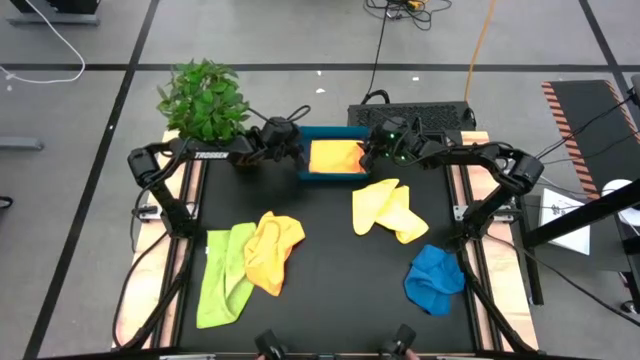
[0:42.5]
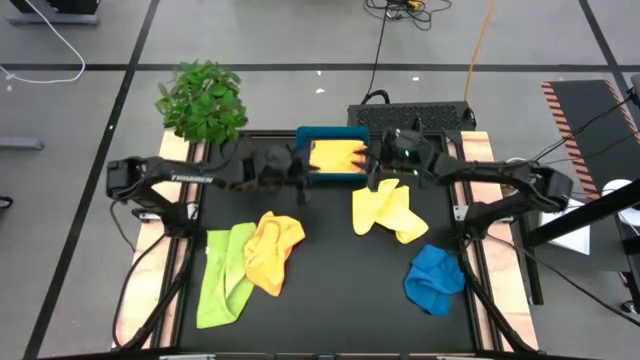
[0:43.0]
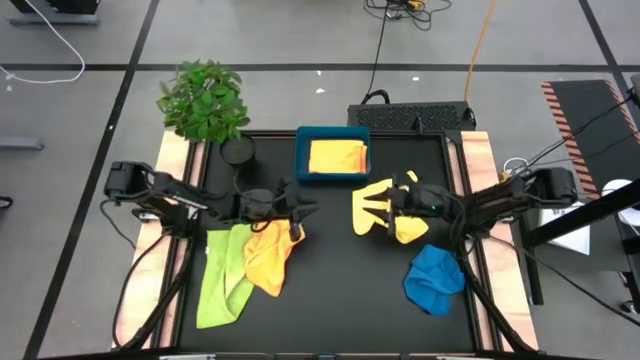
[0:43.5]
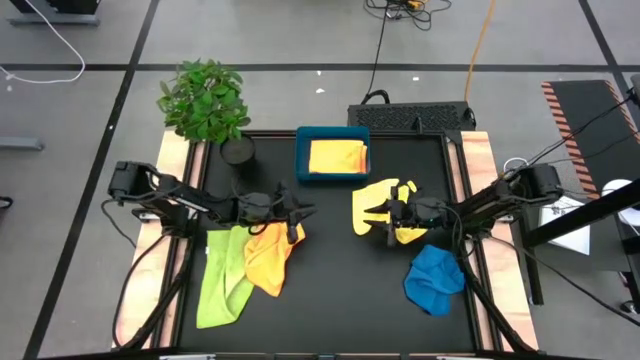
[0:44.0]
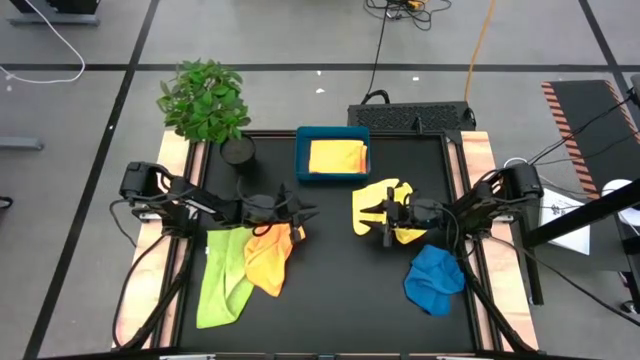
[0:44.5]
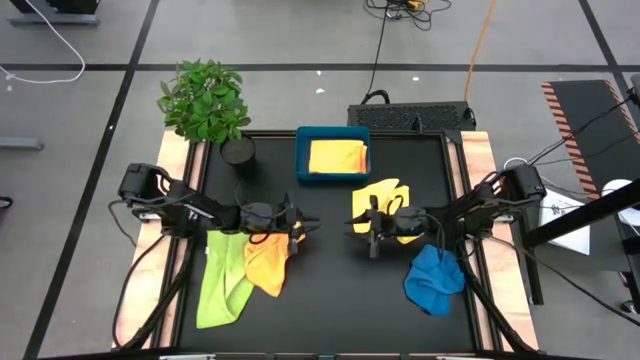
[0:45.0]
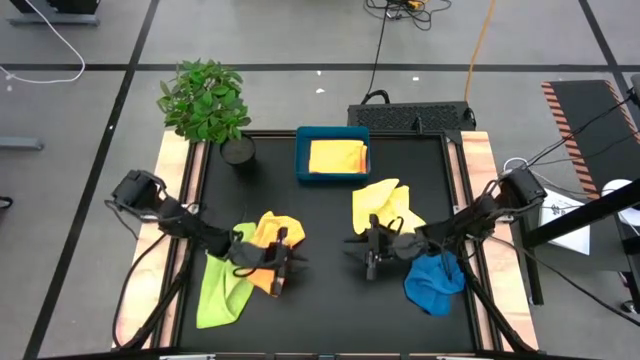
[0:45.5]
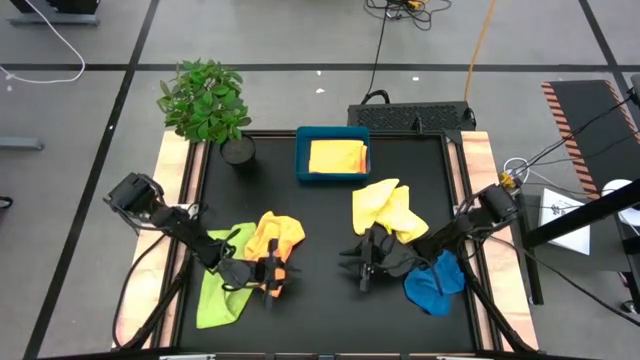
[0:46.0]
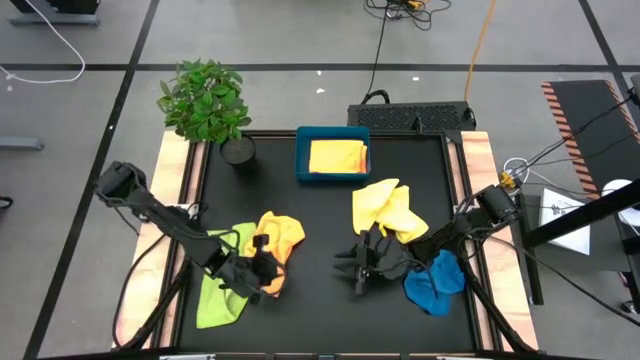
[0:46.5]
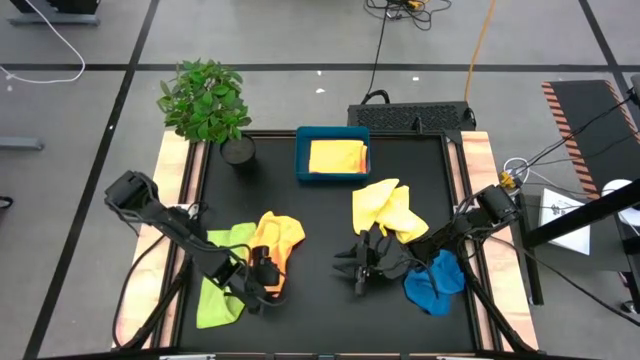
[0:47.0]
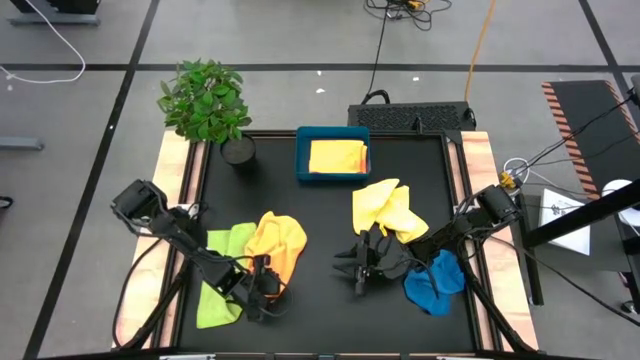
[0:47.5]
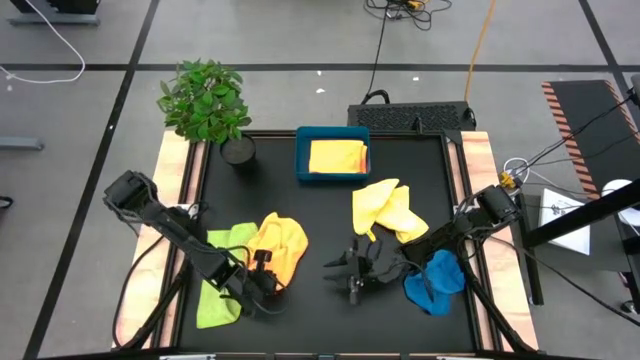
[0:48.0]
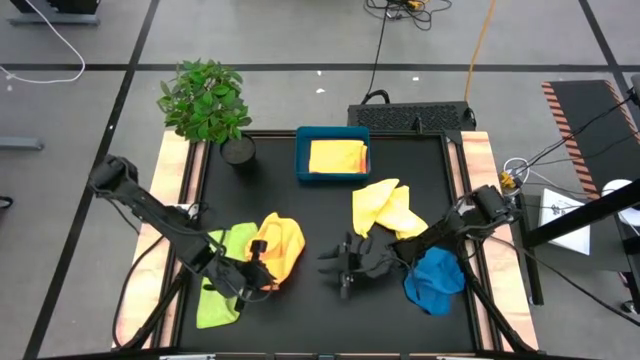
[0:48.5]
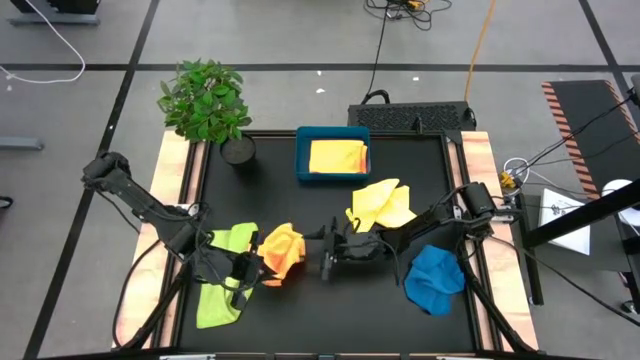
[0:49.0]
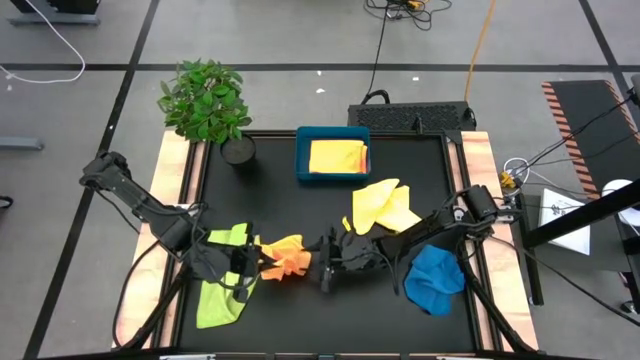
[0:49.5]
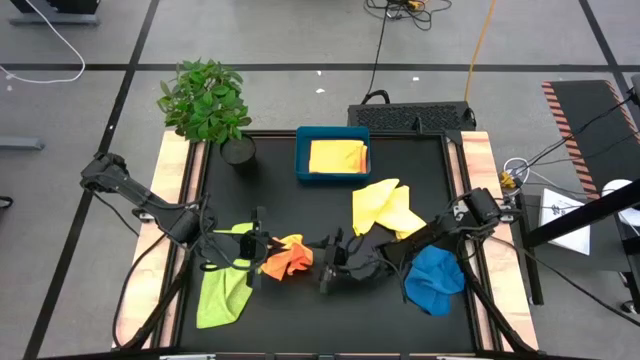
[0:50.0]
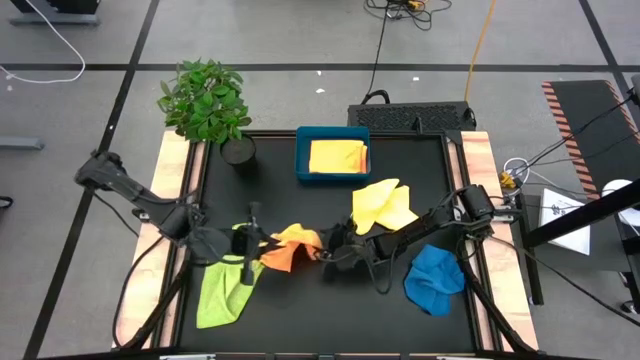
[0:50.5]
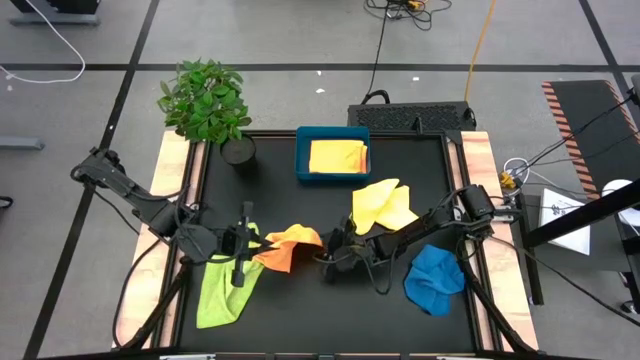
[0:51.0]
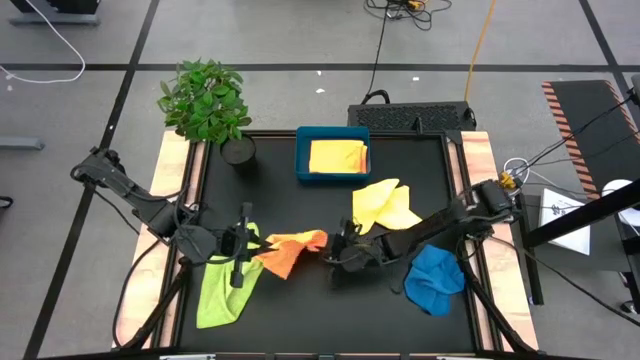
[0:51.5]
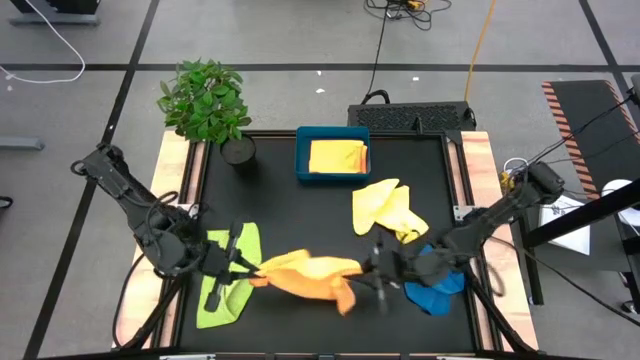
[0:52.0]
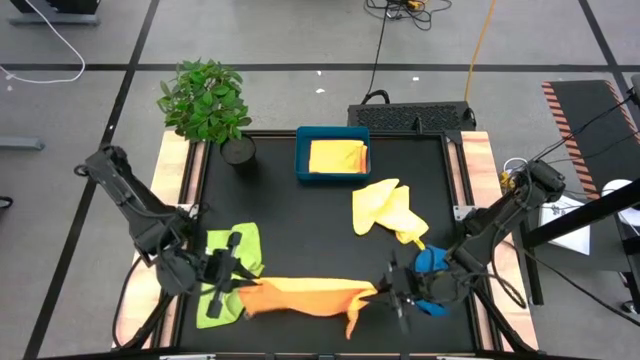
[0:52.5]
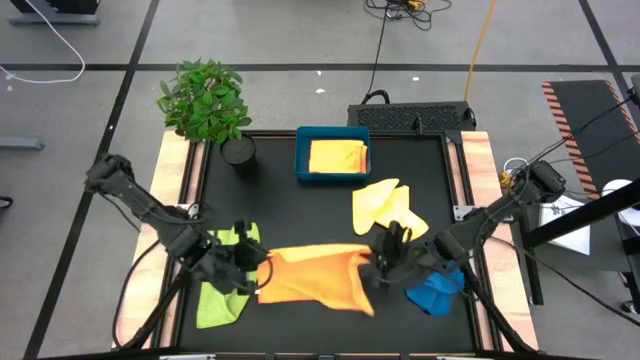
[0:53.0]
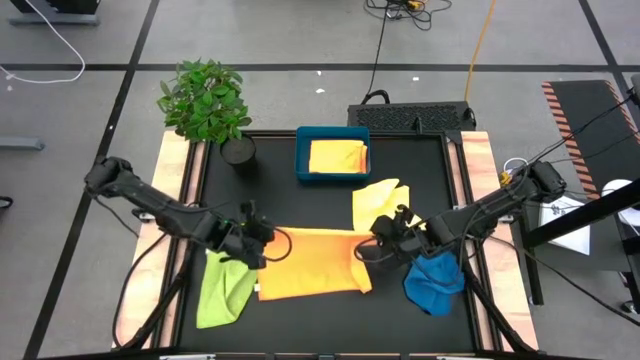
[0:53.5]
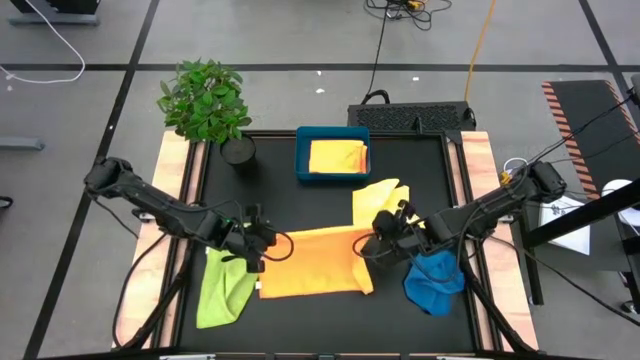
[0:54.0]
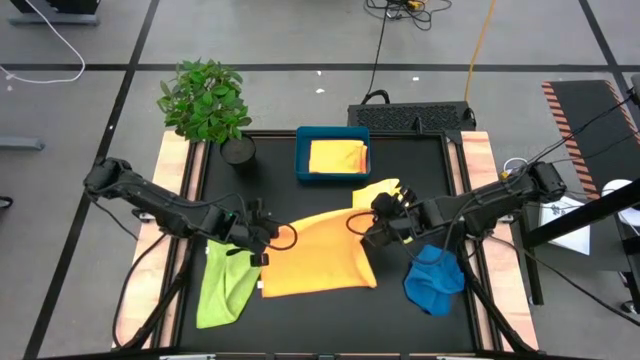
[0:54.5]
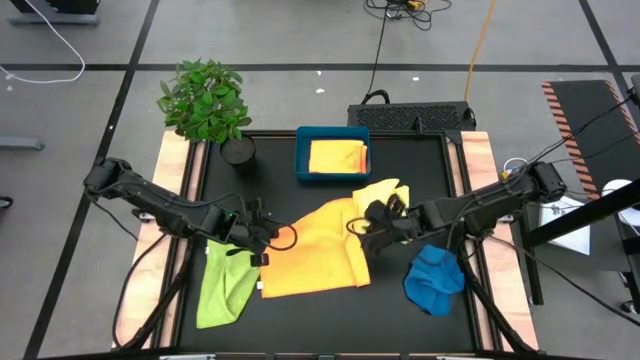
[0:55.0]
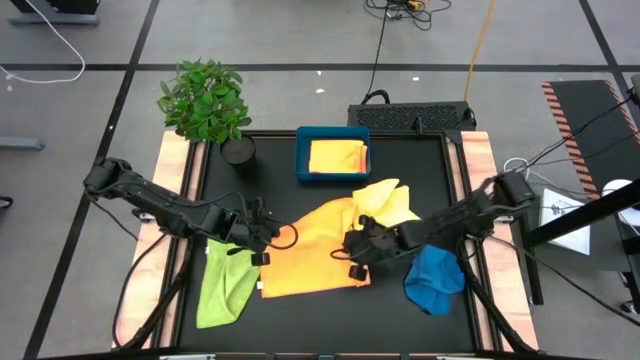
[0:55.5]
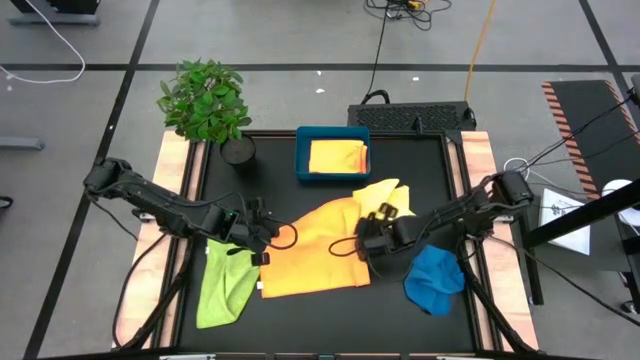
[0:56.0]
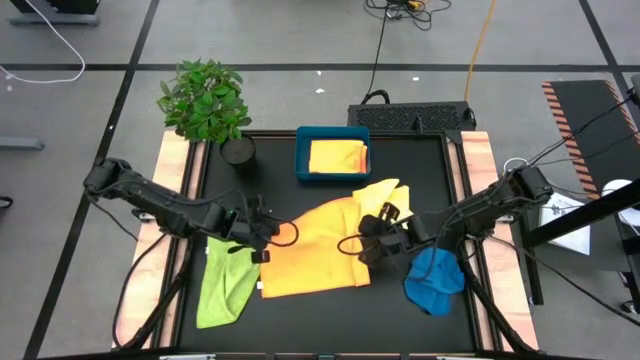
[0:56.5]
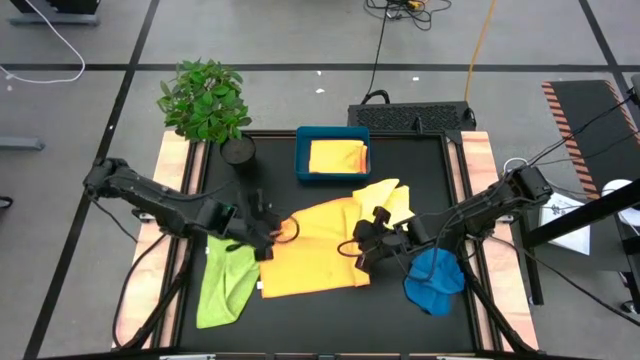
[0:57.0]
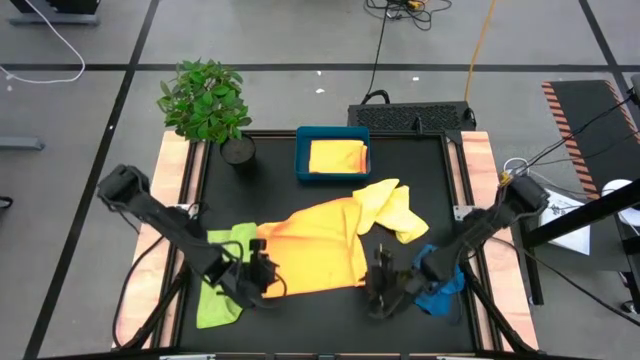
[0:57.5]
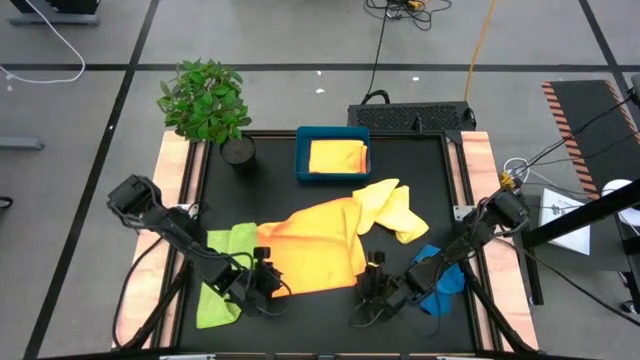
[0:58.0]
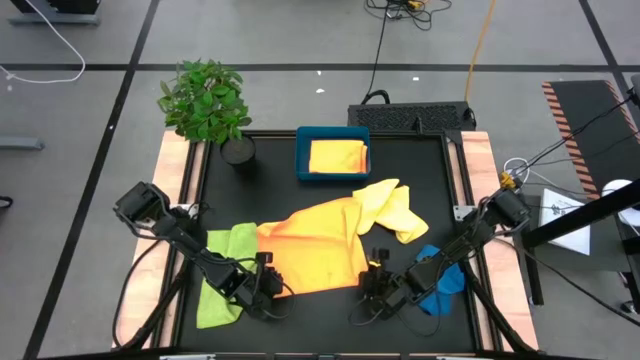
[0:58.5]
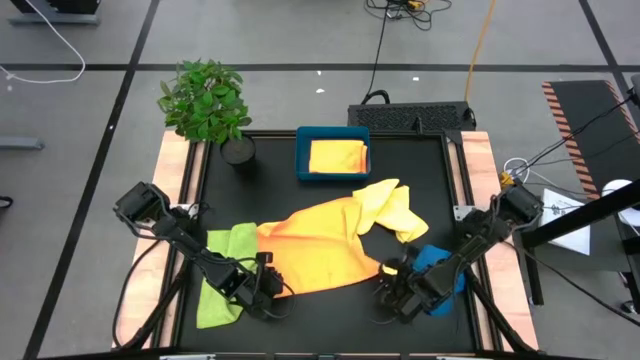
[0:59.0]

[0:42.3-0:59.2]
Task: Fold microfiber towels
Fold the orange microfiber towel

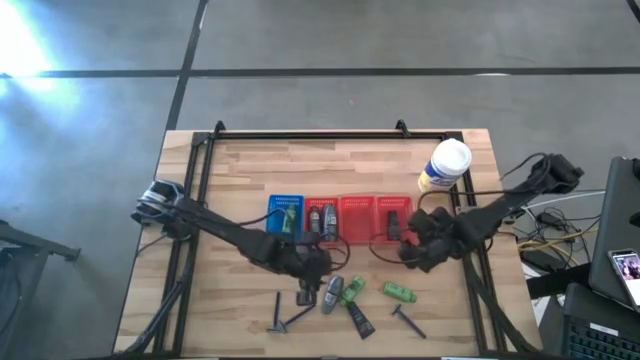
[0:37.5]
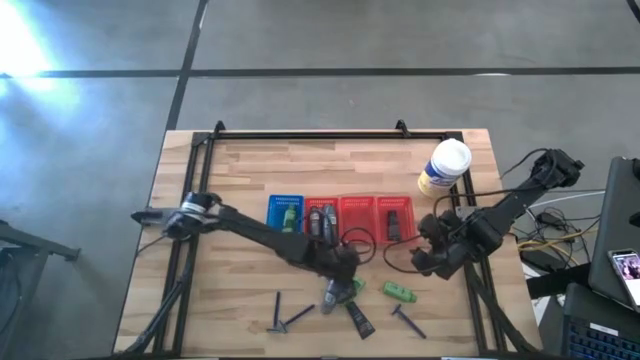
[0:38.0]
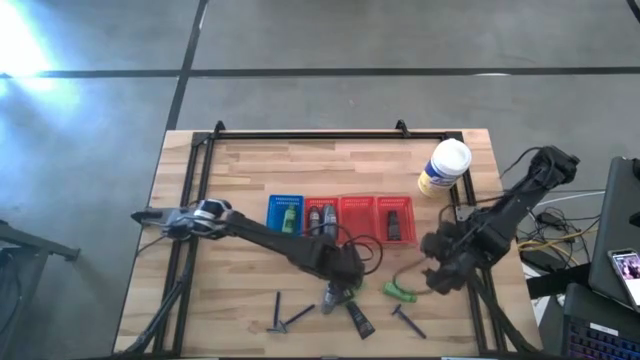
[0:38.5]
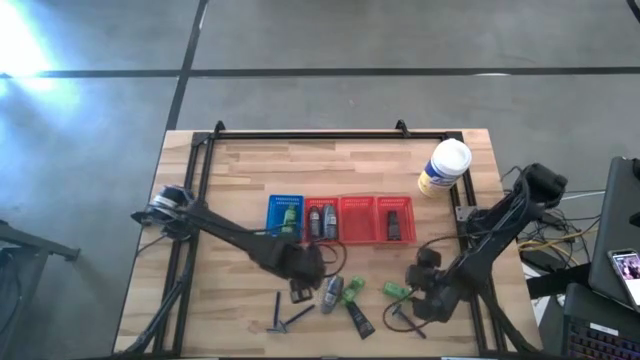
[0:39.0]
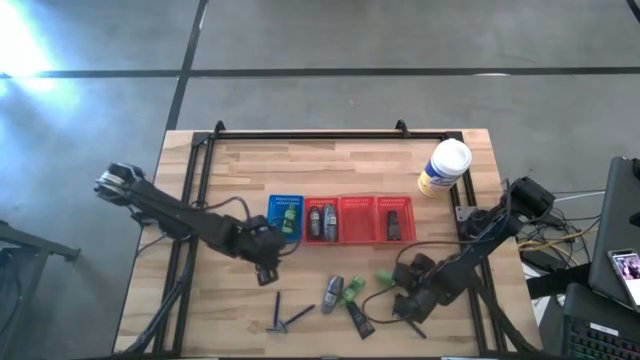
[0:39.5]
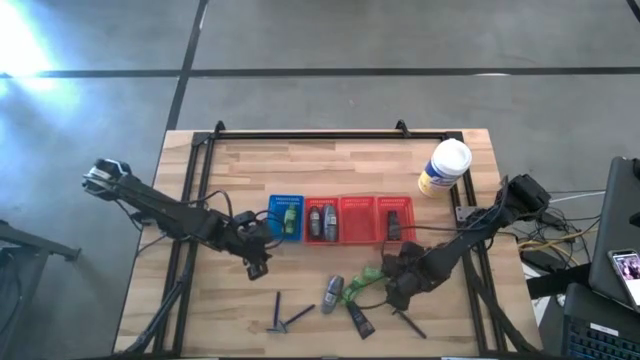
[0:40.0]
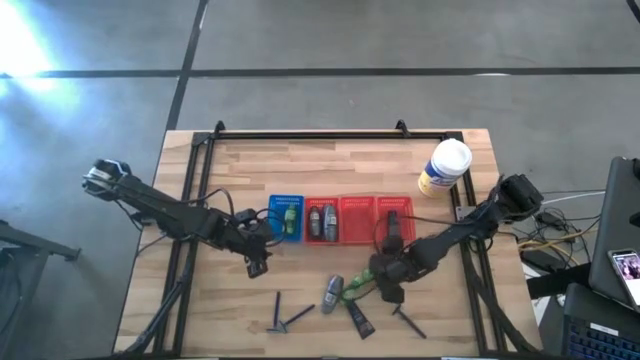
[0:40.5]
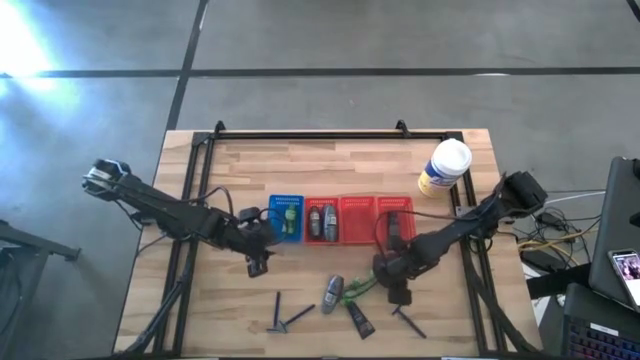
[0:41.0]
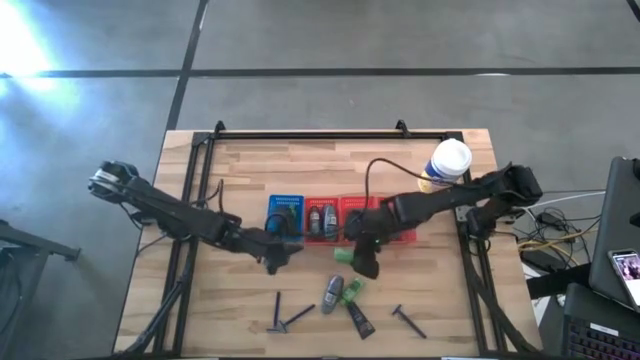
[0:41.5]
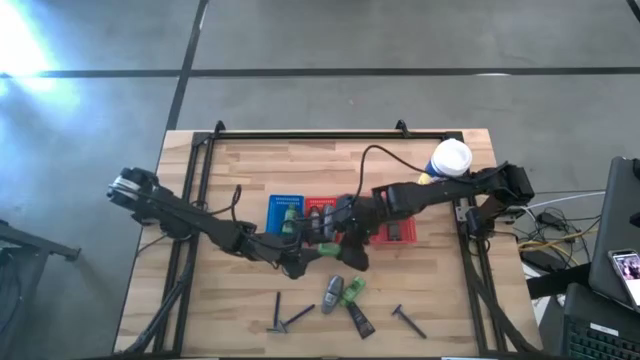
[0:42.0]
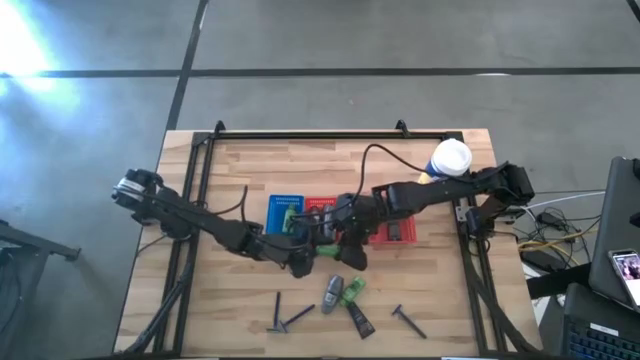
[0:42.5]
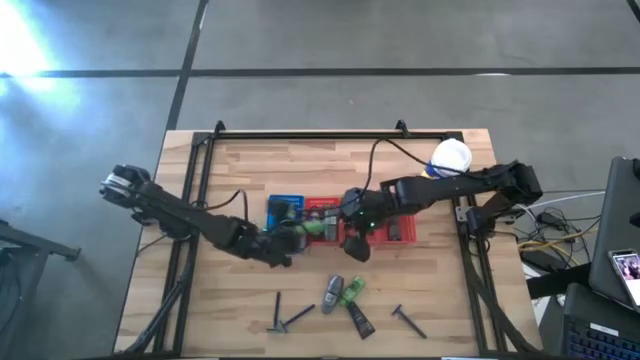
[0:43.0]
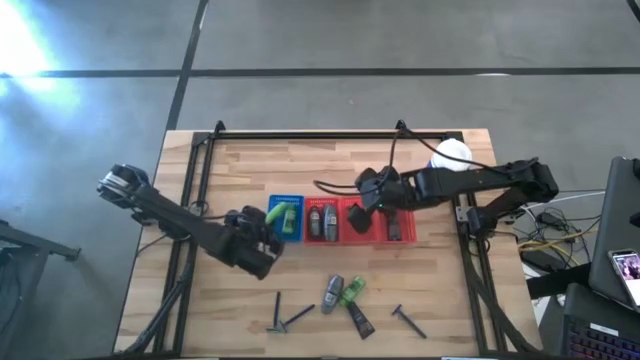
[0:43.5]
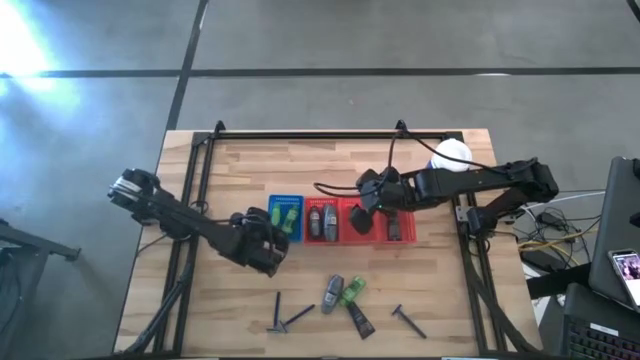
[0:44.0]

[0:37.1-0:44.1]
Task: Pick & Place Travel size toiletries
Put the green shampoo into the blue bin
